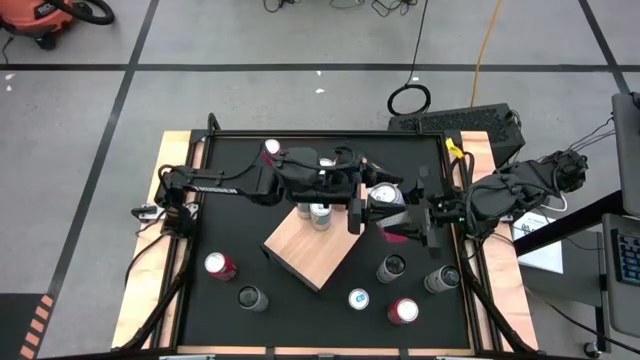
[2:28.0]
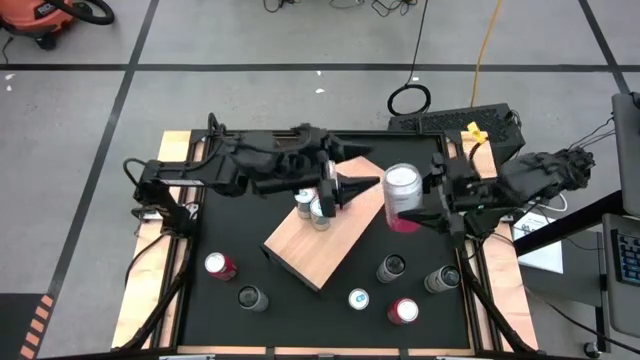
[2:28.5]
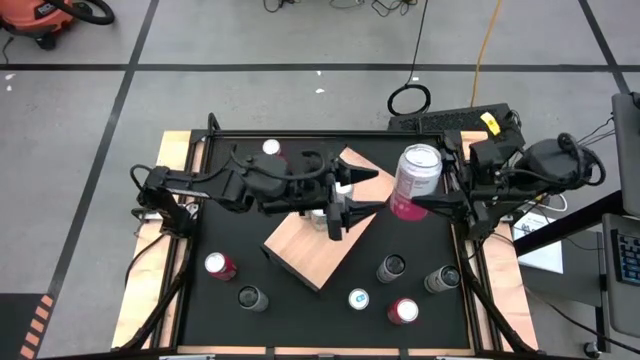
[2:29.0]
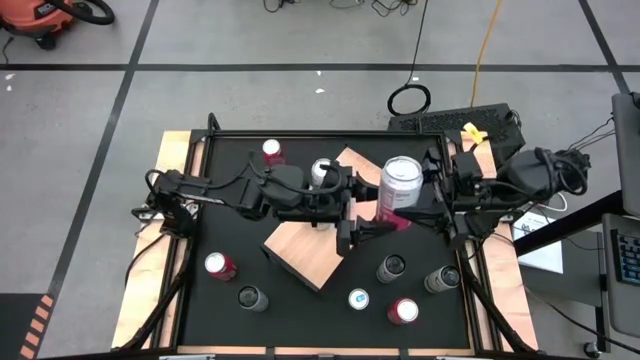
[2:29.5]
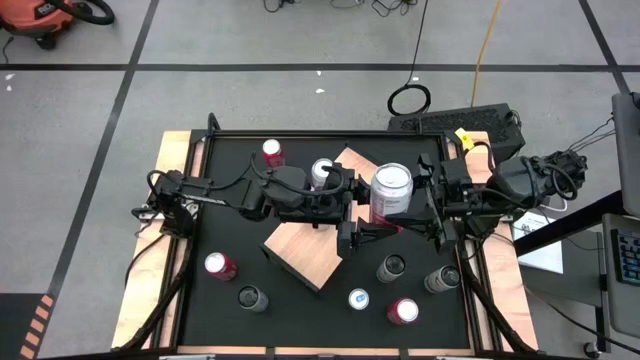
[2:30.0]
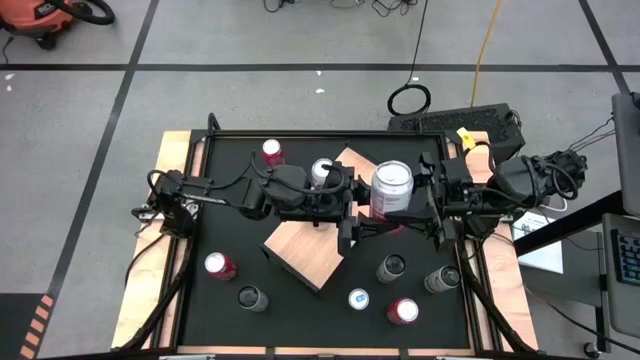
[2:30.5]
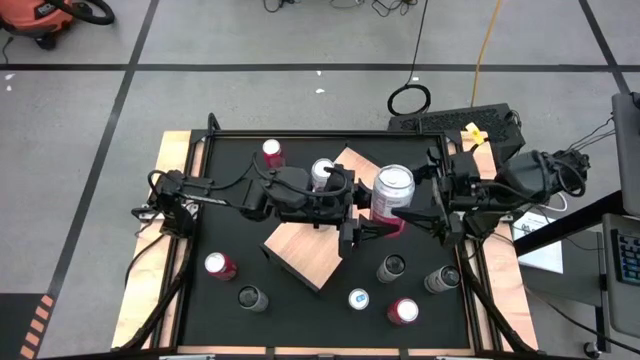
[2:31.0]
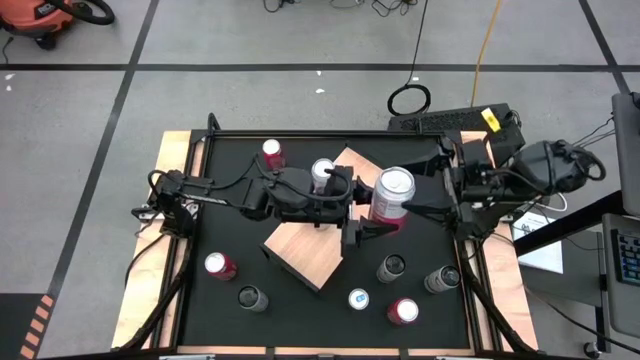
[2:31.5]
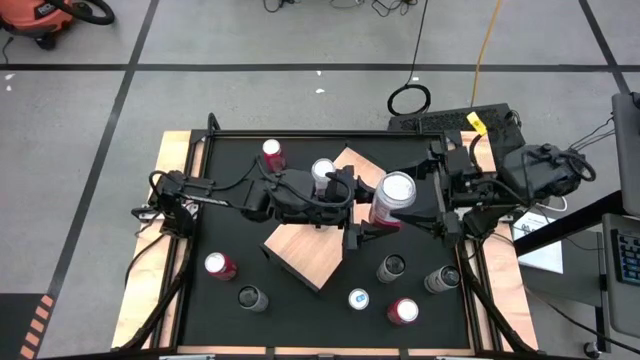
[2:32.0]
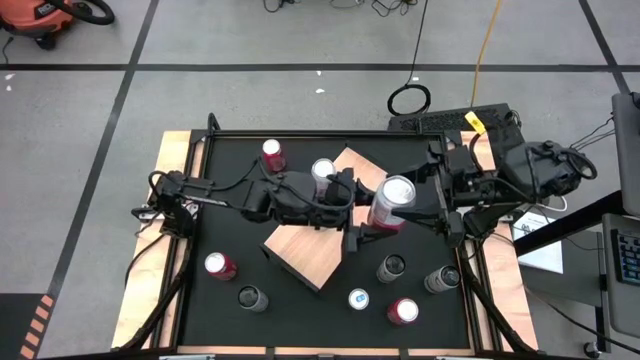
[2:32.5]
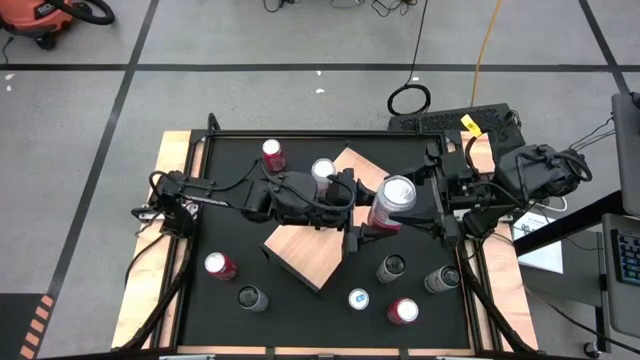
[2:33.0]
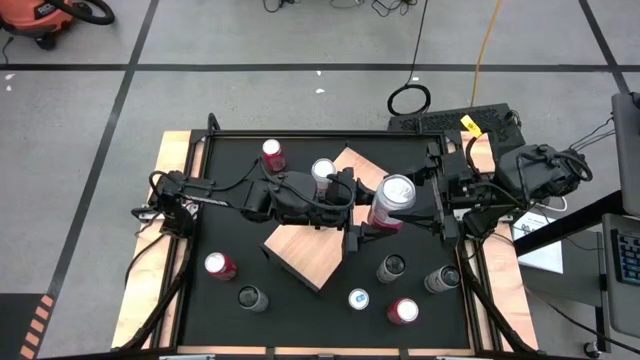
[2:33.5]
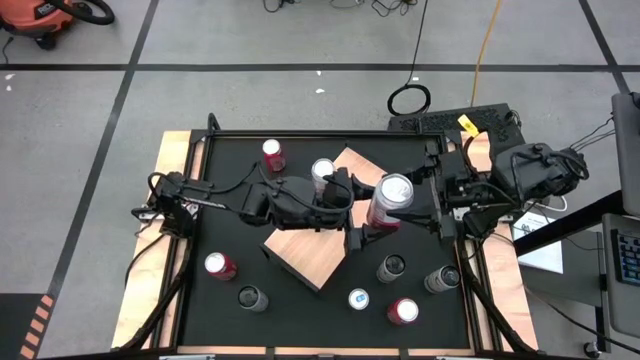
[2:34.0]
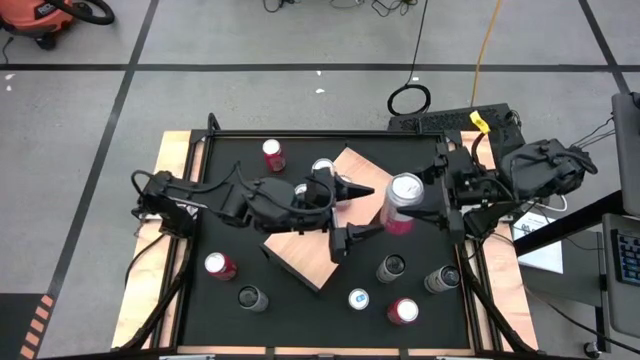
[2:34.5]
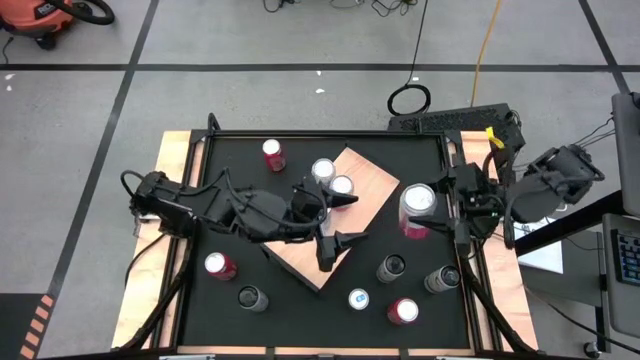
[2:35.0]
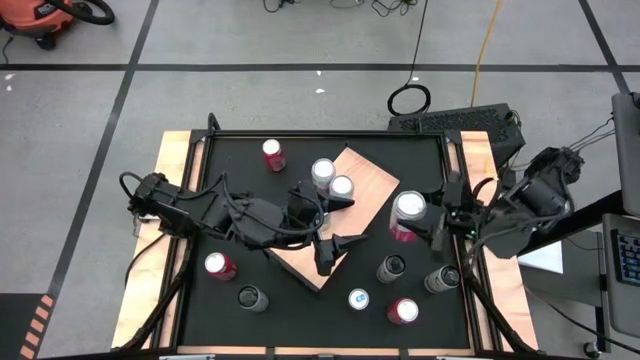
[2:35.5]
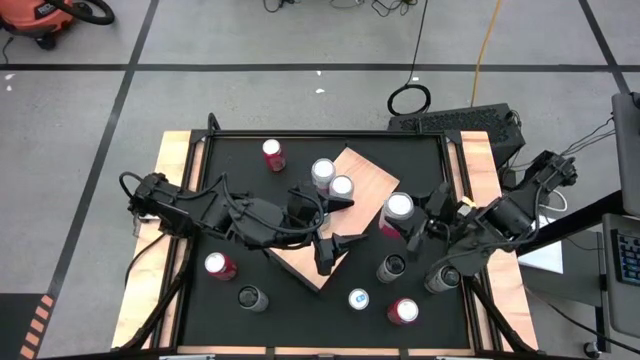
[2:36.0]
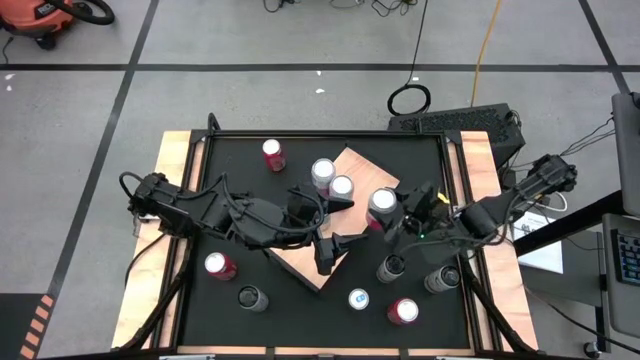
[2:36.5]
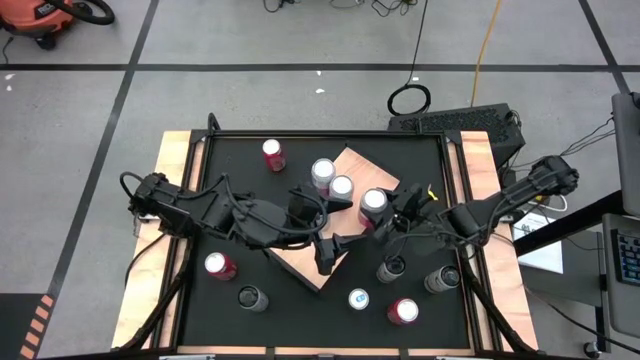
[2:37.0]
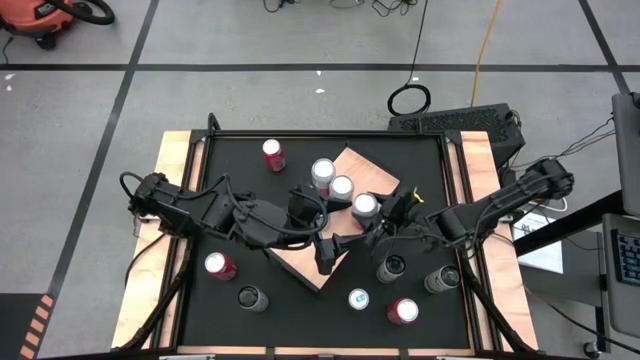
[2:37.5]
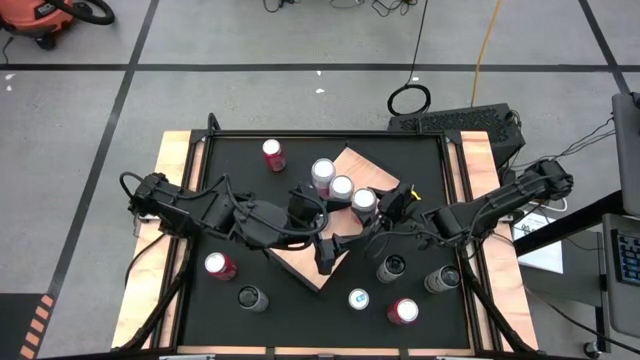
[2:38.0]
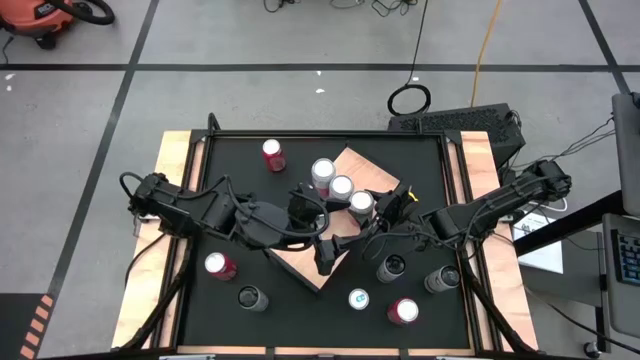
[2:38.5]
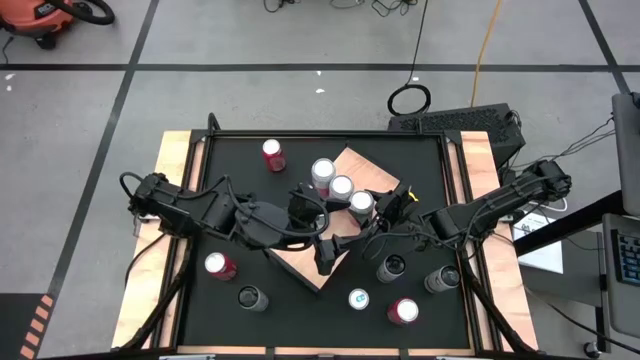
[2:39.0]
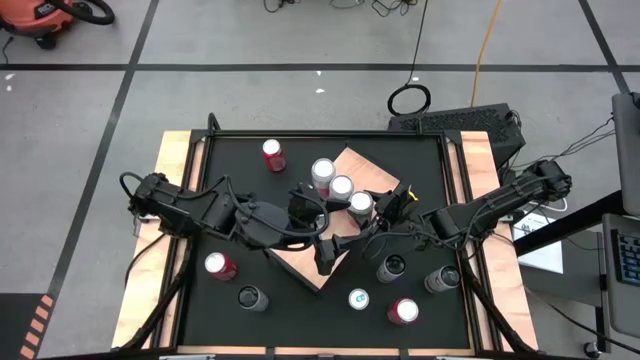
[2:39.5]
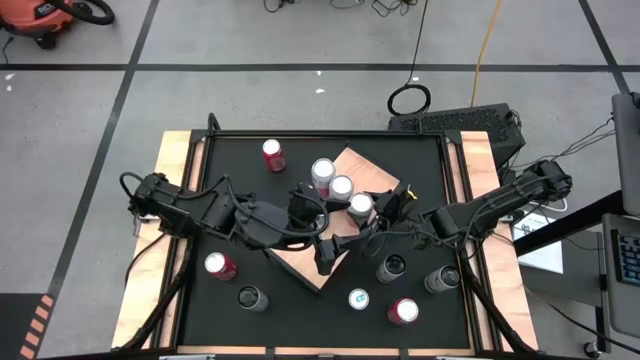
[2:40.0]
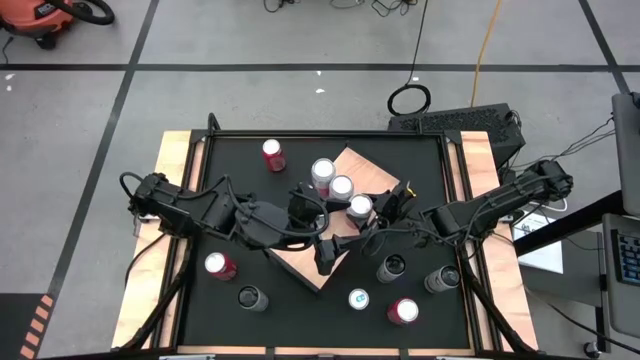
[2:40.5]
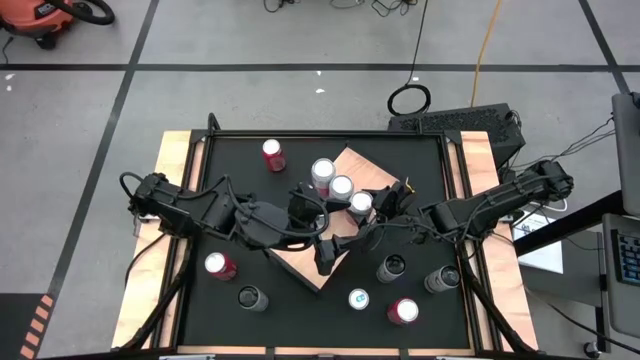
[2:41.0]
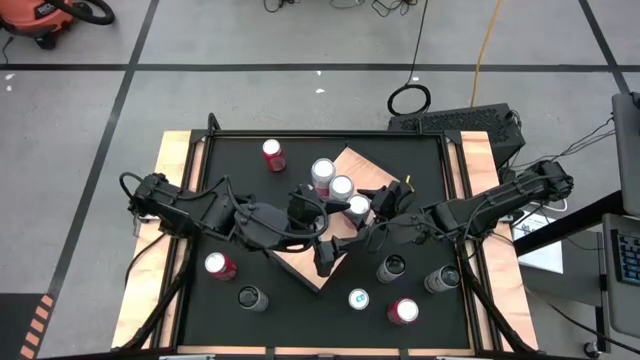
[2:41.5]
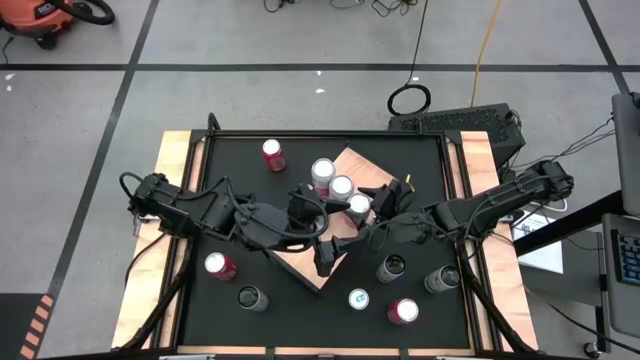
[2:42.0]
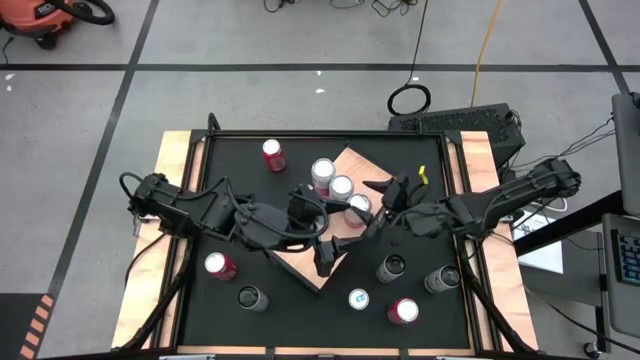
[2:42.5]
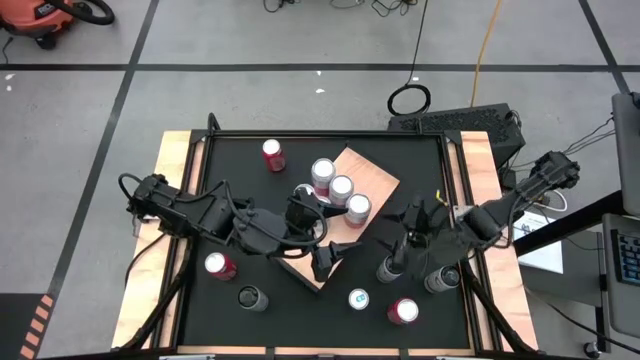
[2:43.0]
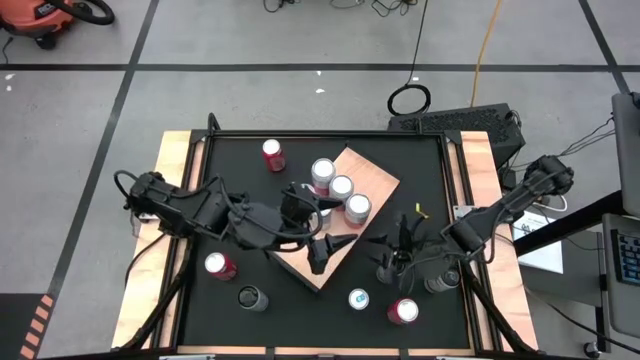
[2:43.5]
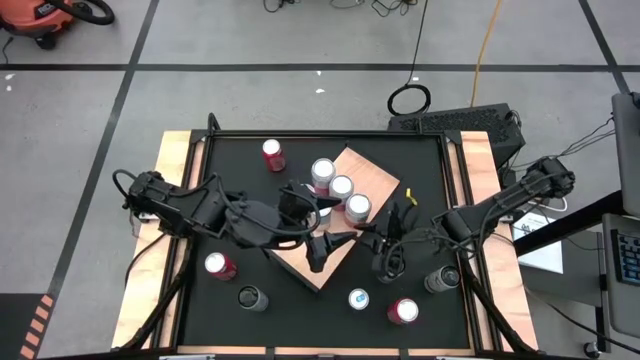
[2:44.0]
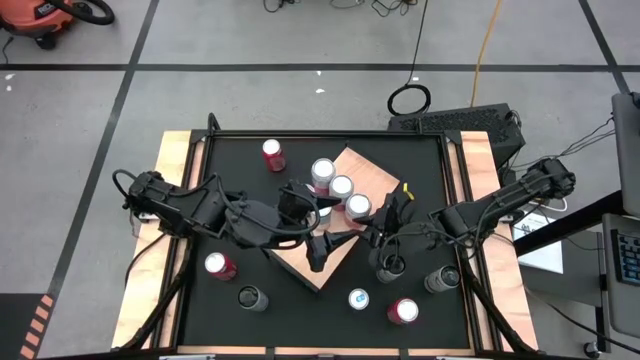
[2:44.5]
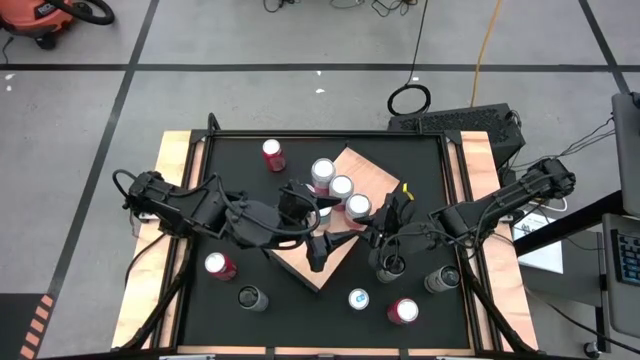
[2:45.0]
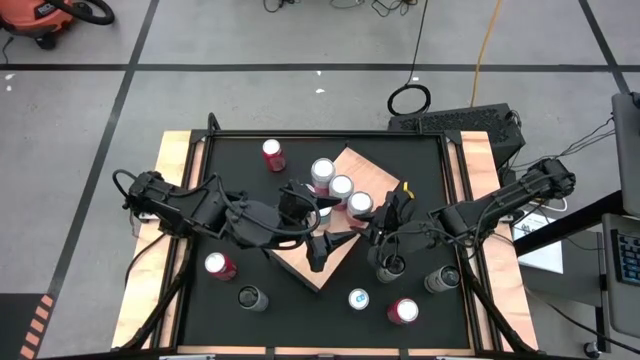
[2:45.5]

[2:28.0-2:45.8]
Task: Place canned beverage on shelf
Put the pink-white soda can on the shelf aligned with the pink-white soda can

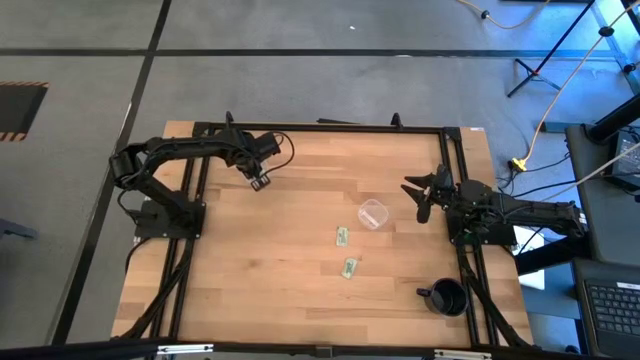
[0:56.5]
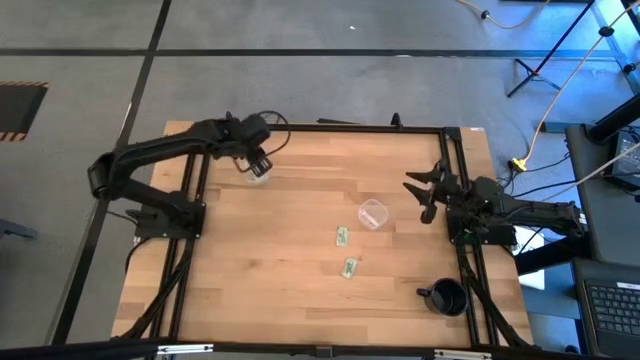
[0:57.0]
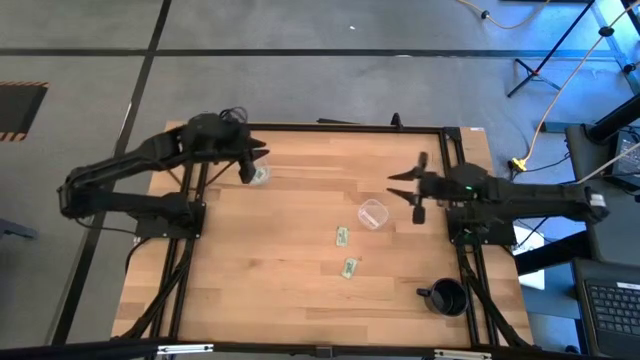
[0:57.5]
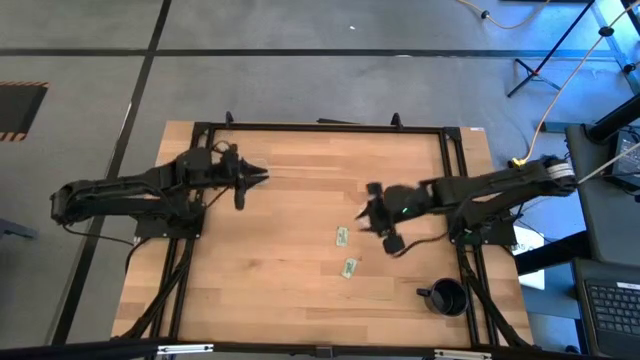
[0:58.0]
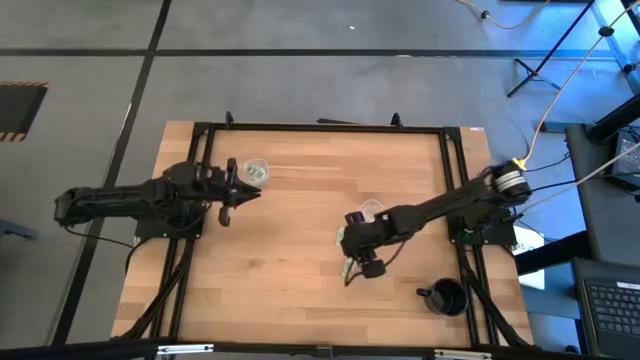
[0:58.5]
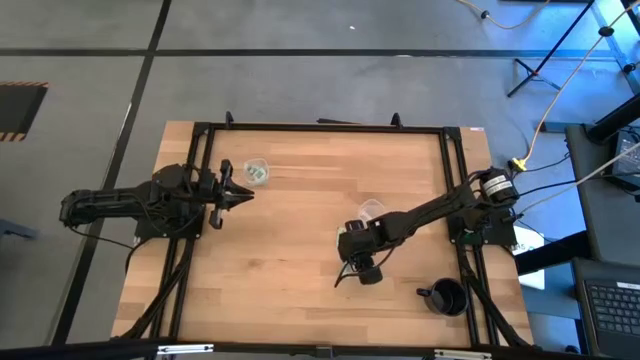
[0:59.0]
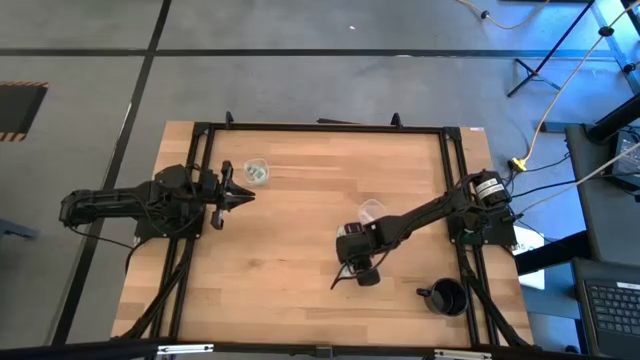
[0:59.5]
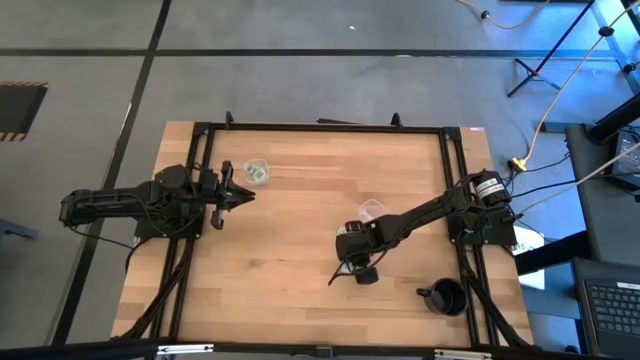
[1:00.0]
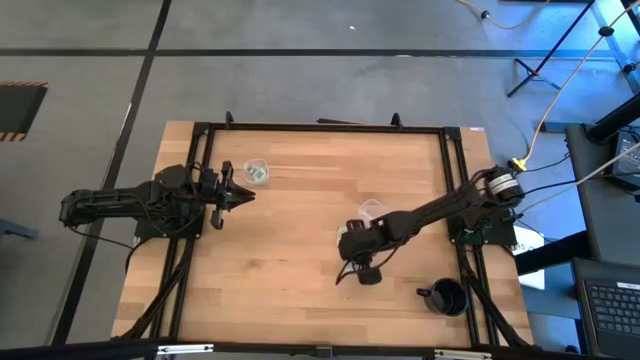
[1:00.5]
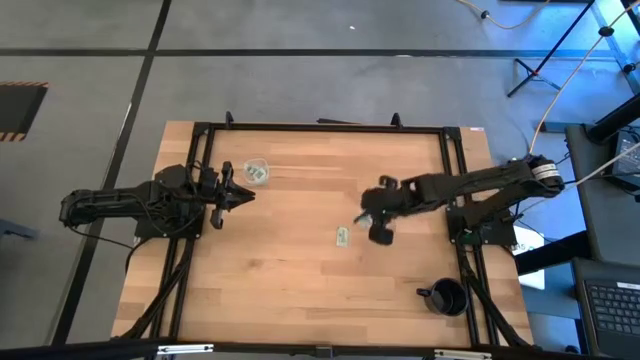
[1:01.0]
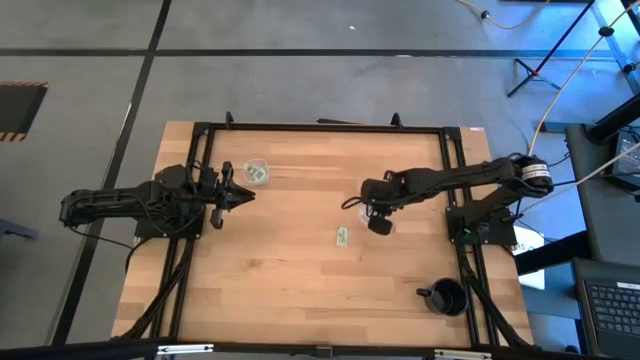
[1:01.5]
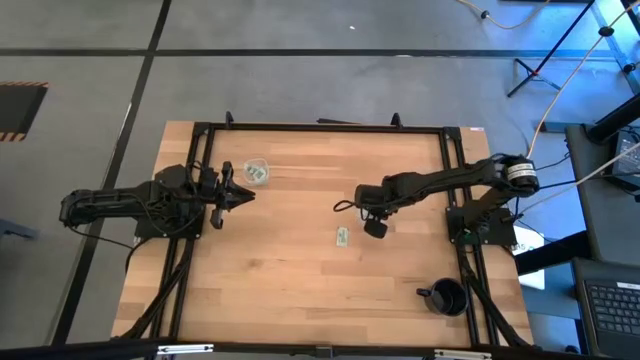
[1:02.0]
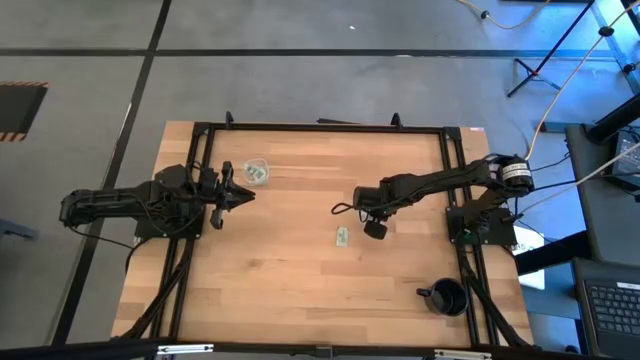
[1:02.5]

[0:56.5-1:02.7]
Task: Pick and place Stevia / Truvia into bins
Put the green stevia packet into the right white container
